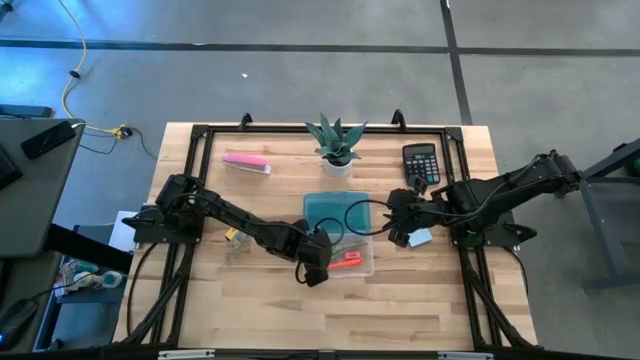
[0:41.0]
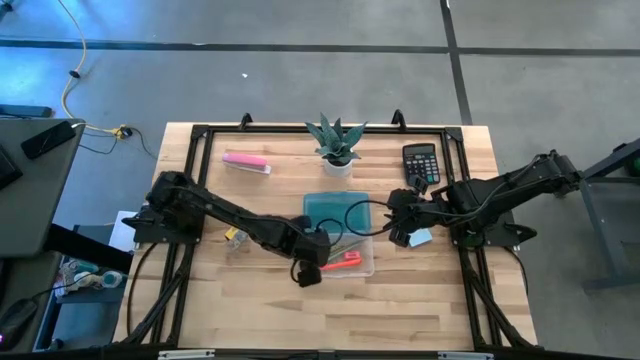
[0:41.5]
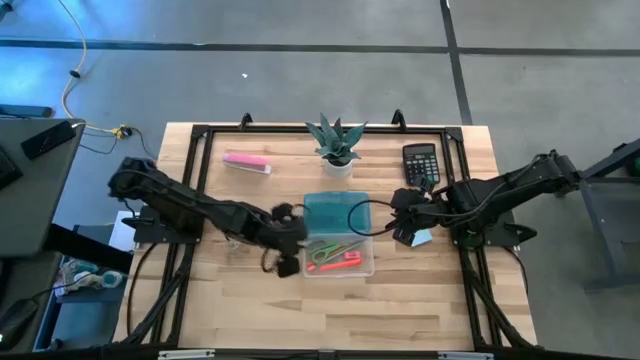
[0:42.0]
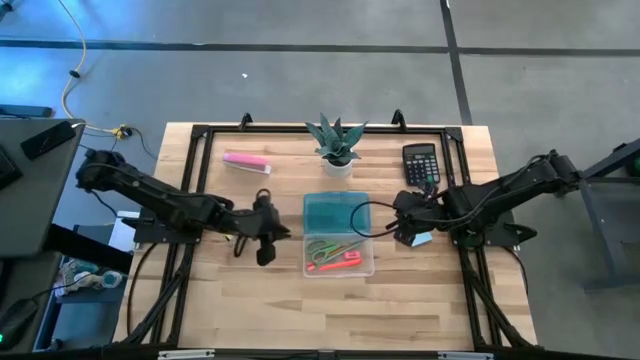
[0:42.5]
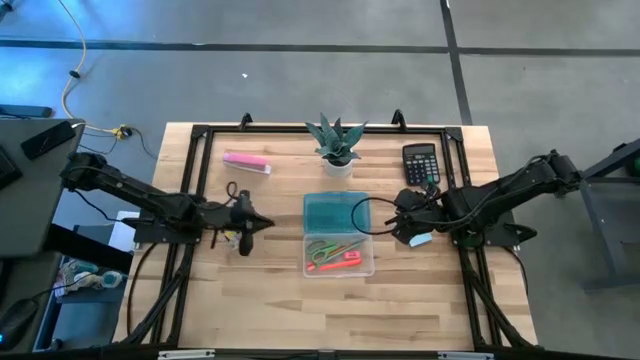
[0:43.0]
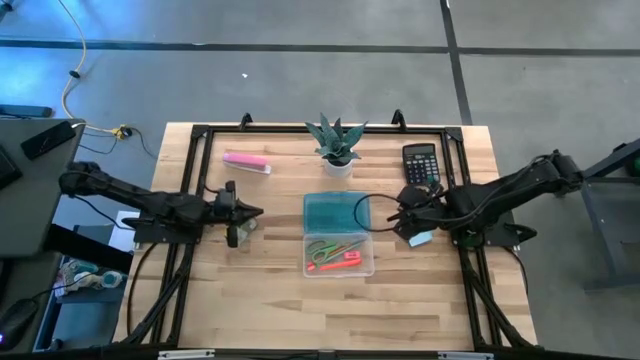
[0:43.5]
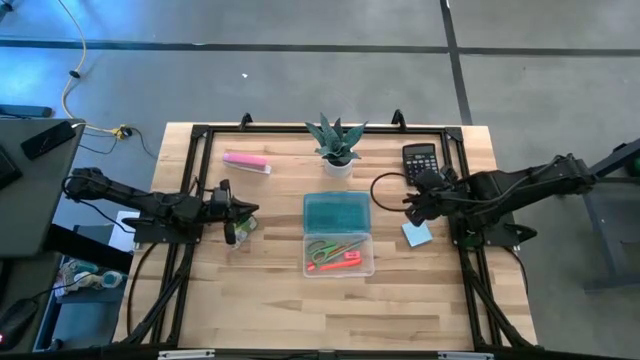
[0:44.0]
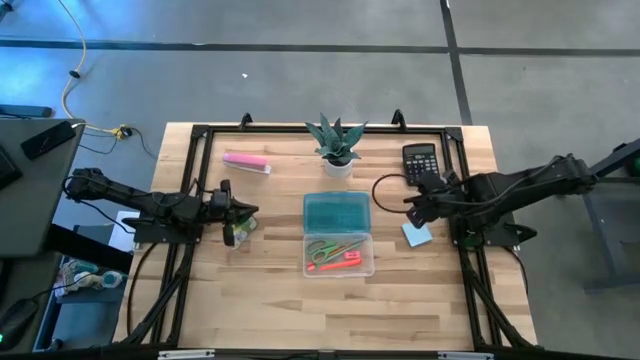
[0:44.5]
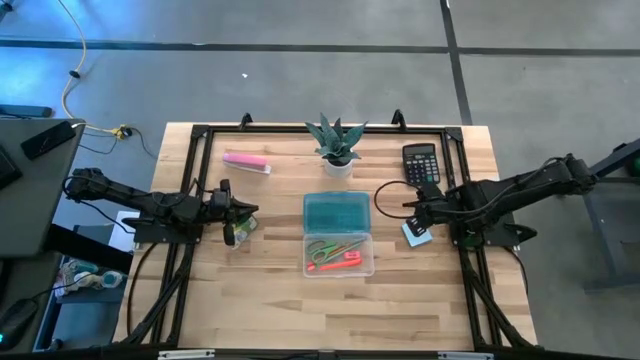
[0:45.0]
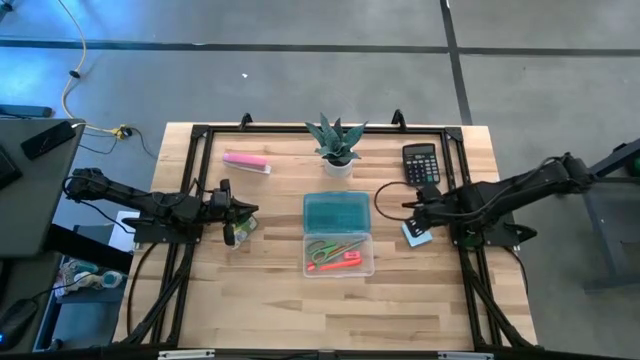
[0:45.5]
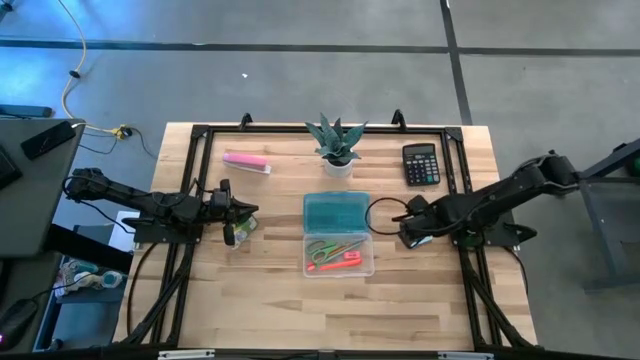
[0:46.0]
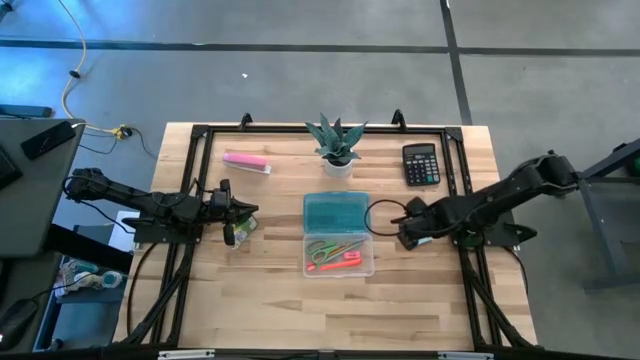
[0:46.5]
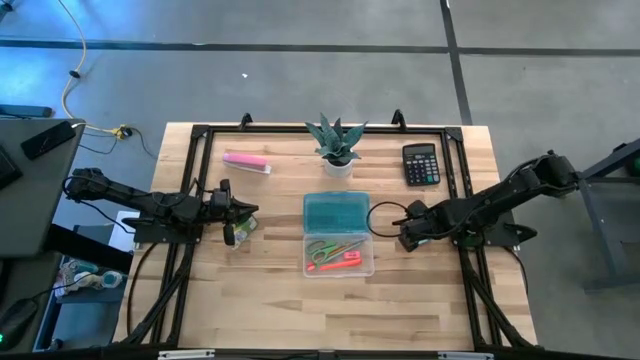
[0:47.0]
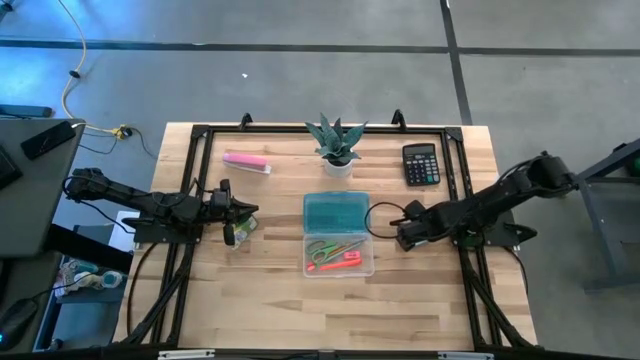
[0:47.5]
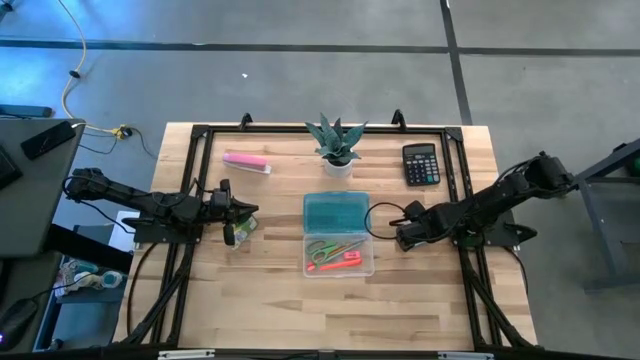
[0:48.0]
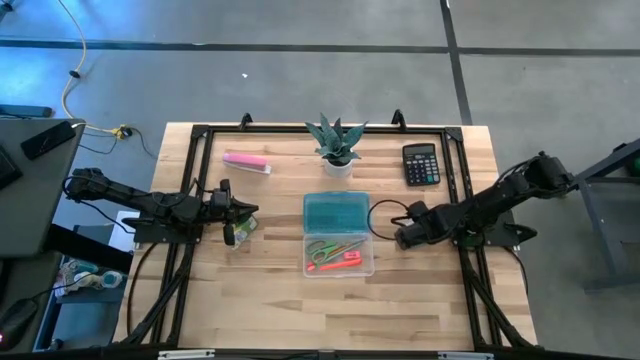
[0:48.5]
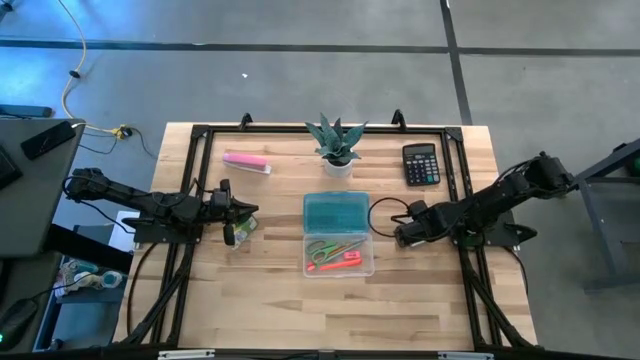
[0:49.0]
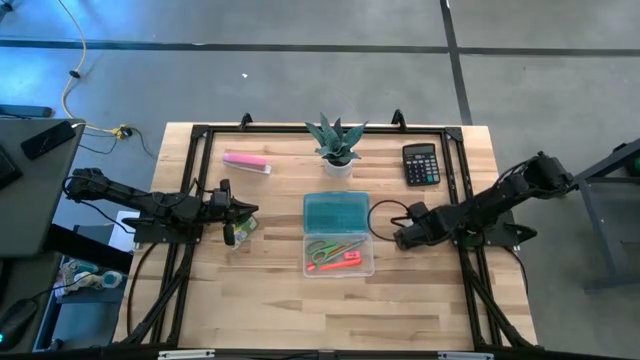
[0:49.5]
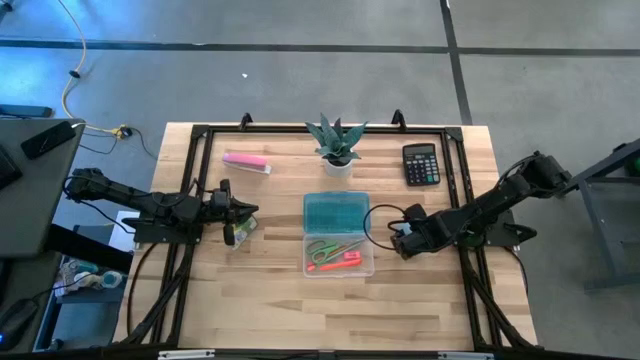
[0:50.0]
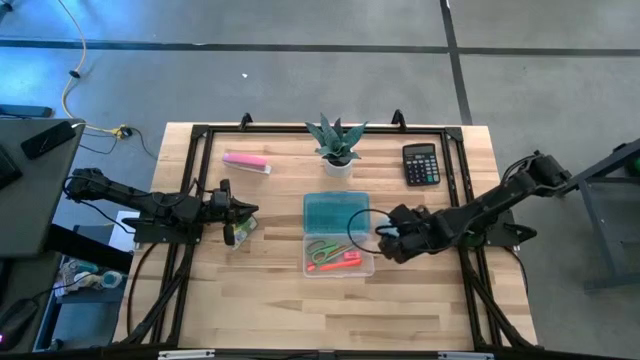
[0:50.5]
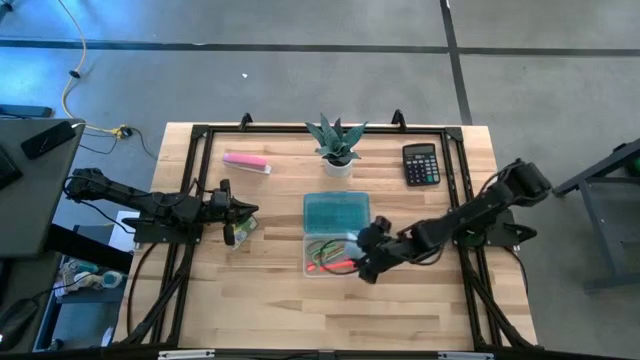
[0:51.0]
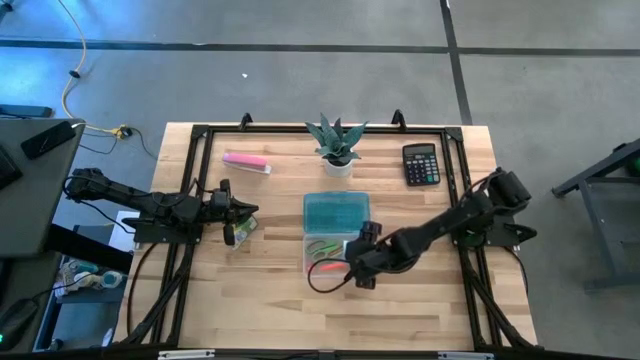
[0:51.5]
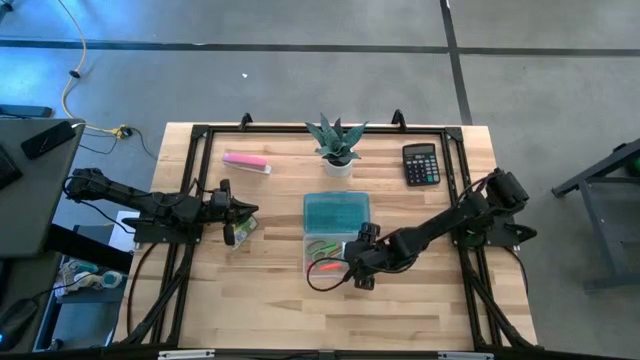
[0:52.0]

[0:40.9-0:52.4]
Task: Pack school essentials
Put the blue sticky notes into the blue supply box

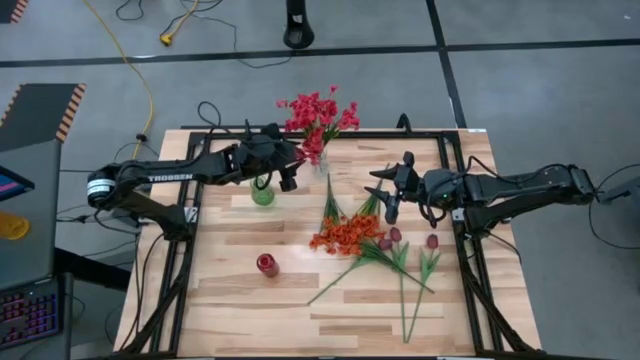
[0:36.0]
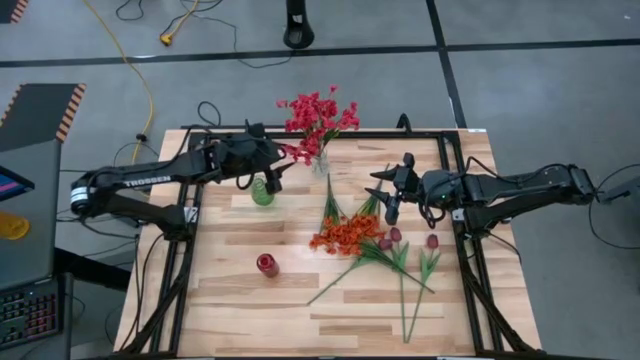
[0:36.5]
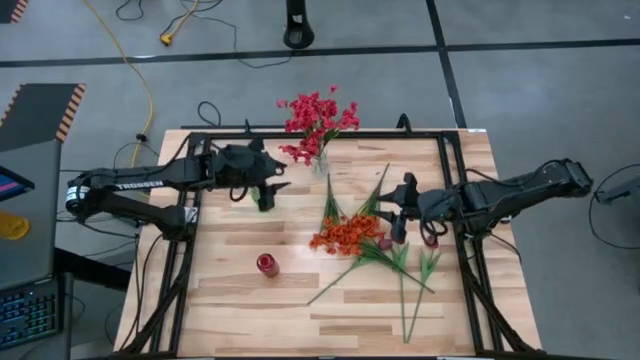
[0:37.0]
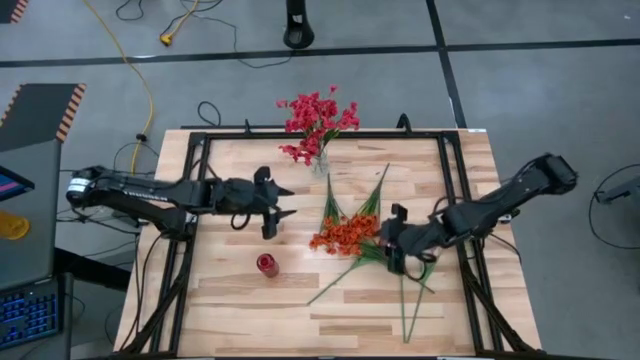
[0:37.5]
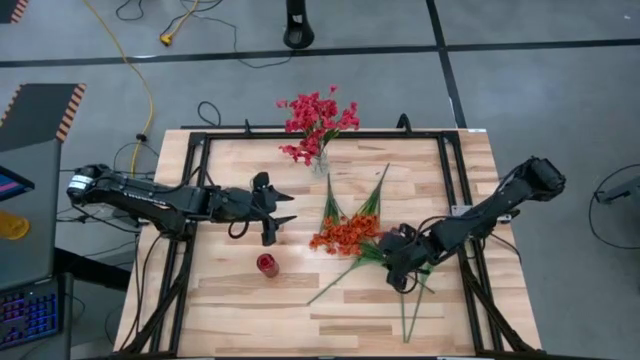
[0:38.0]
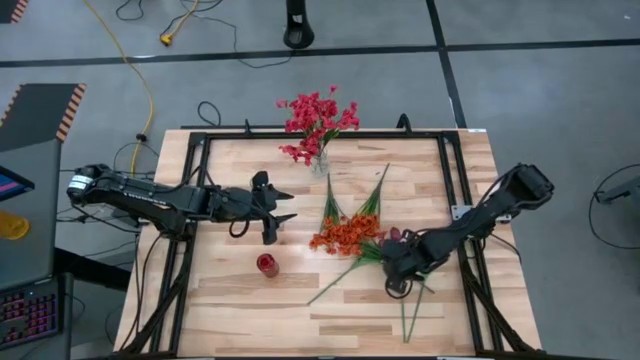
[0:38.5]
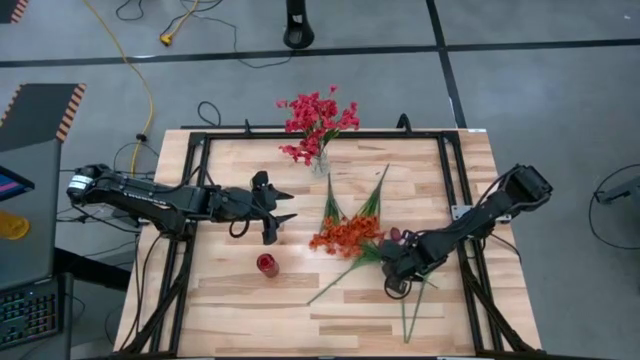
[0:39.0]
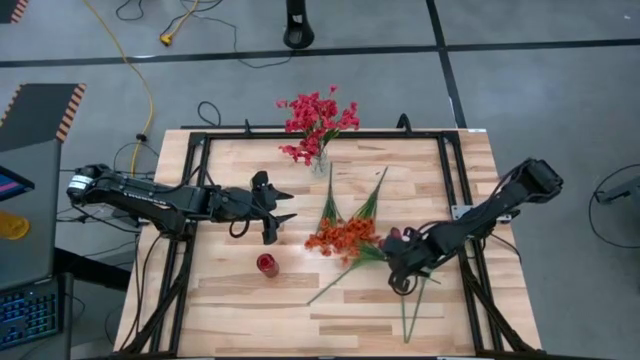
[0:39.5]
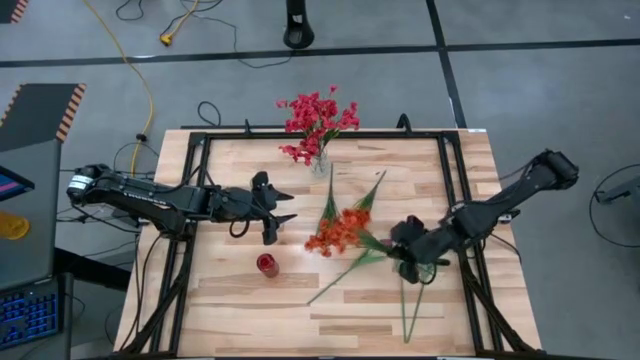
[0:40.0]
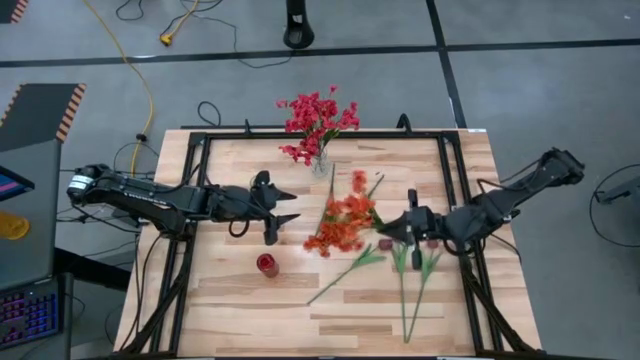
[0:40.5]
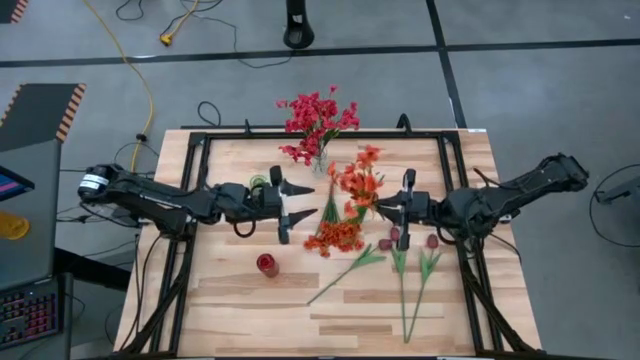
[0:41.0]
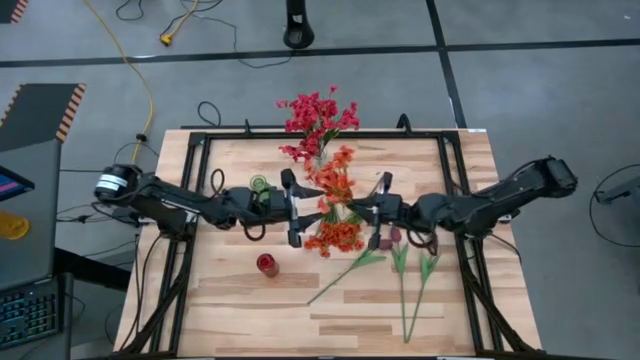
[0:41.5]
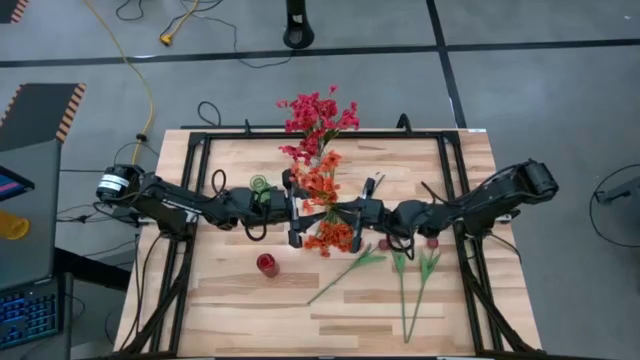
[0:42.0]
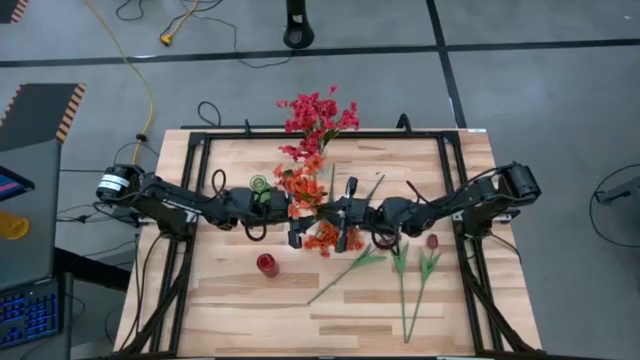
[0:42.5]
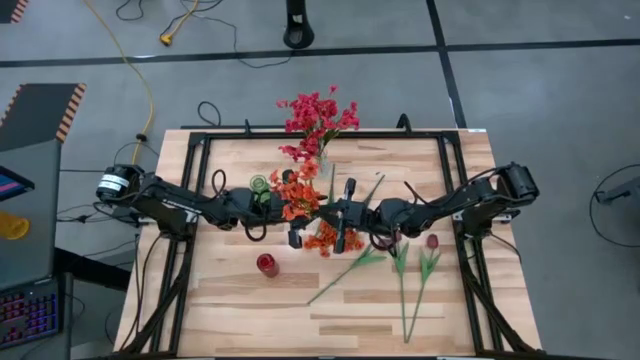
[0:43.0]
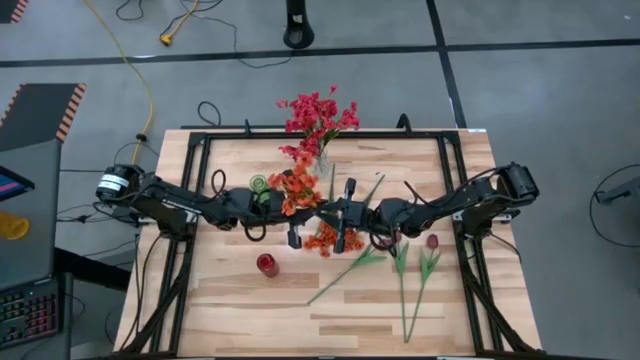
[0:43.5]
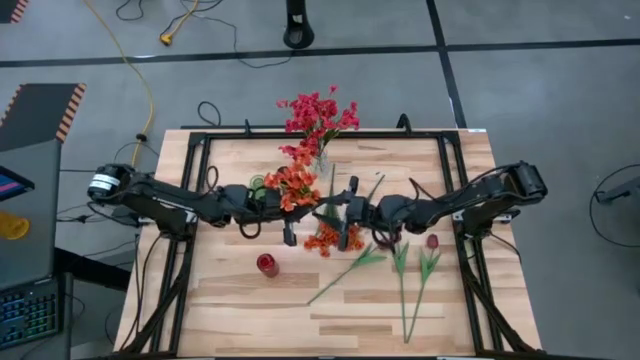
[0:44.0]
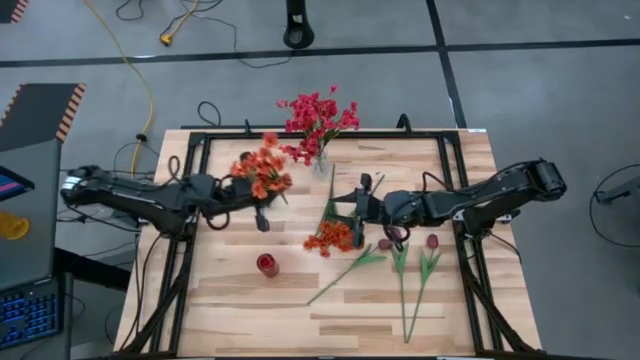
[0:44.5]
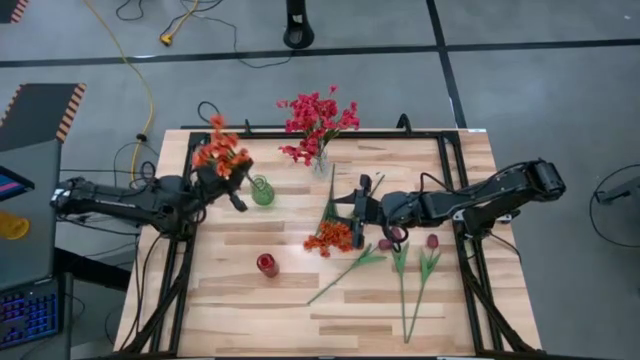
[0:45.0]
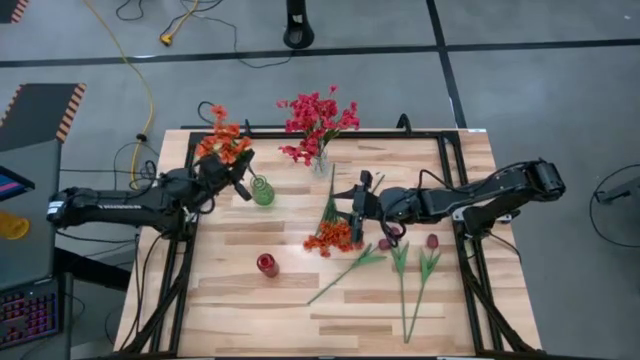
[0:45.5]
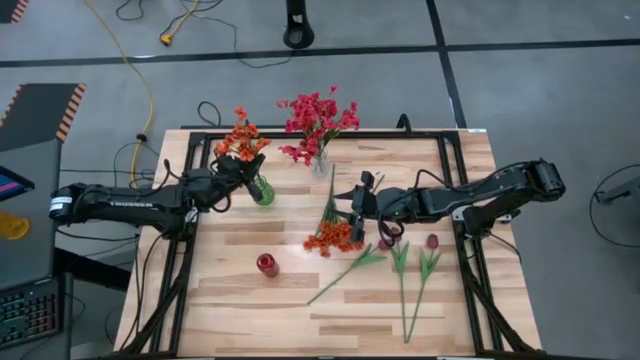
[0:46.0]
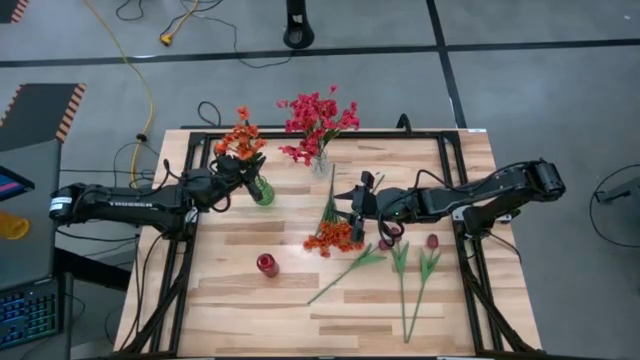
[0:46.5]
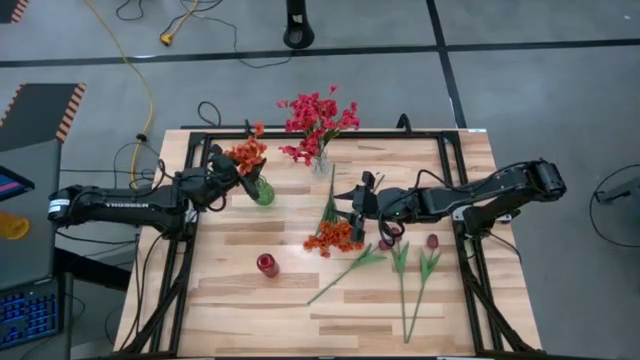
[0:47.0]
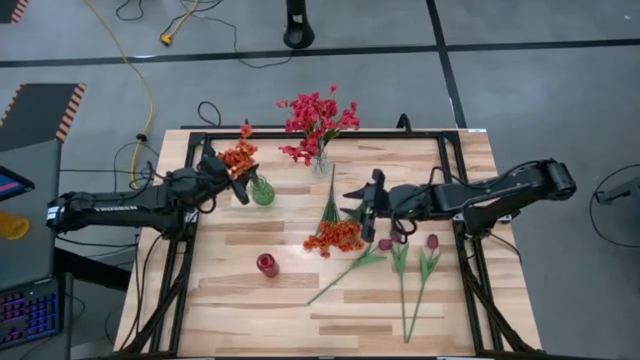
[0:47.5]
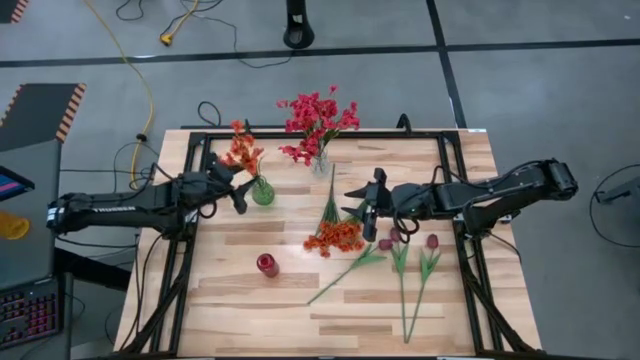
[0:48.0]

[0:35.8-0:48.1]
Task: Sort flowers into vase by color
Put the bottom orange flower into the green vase
